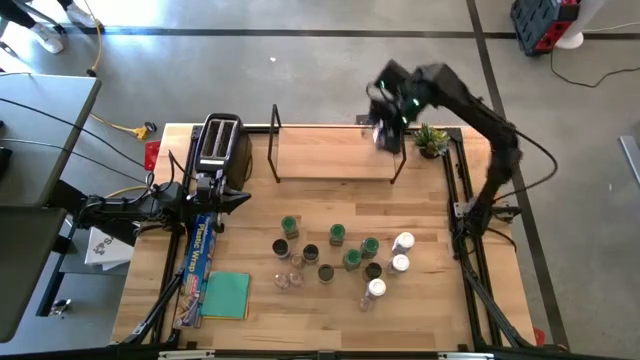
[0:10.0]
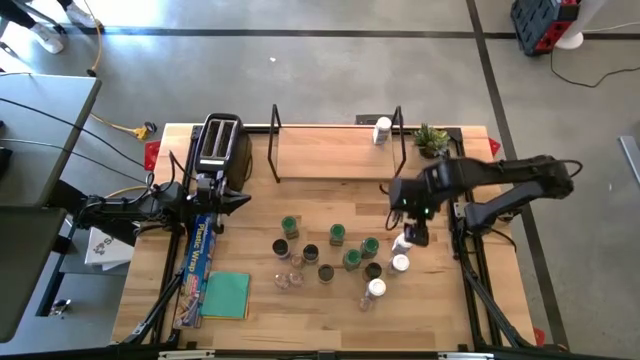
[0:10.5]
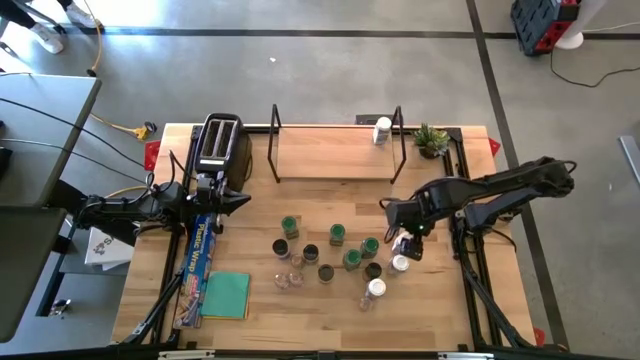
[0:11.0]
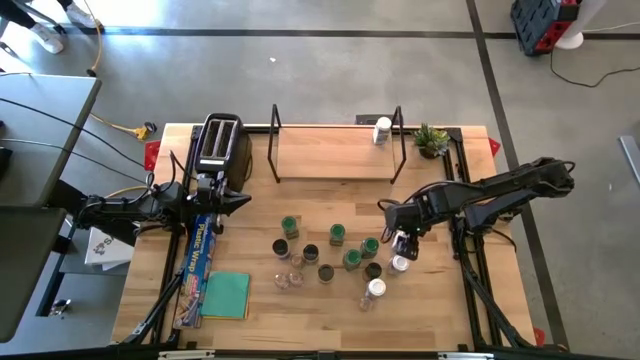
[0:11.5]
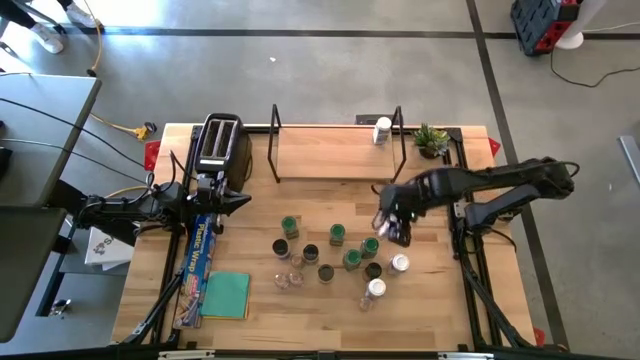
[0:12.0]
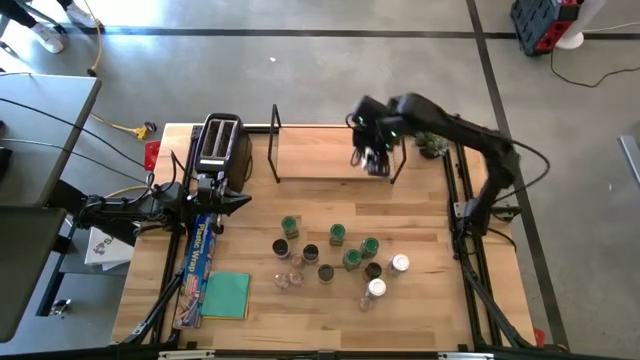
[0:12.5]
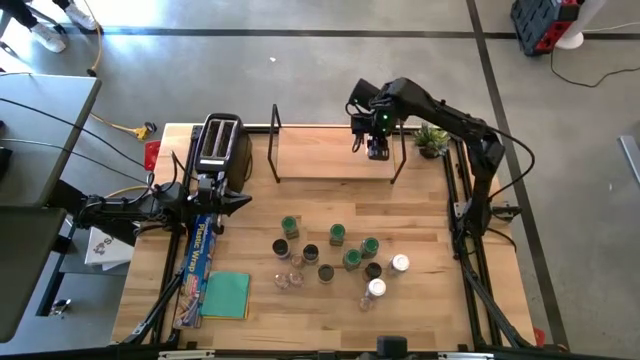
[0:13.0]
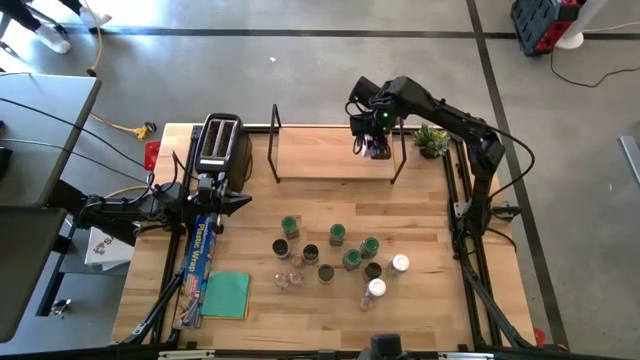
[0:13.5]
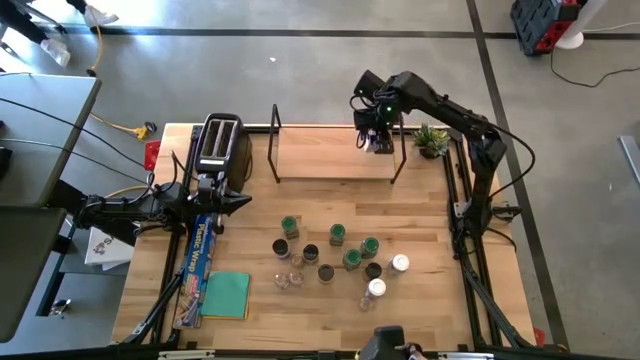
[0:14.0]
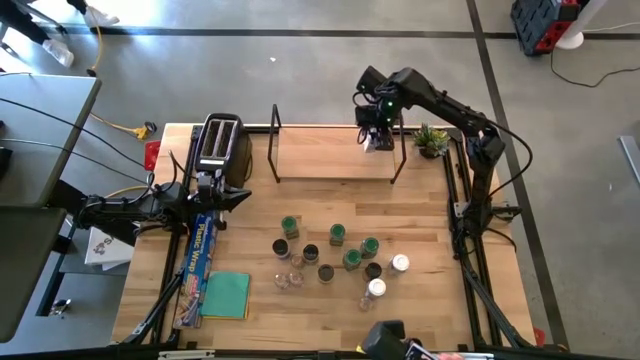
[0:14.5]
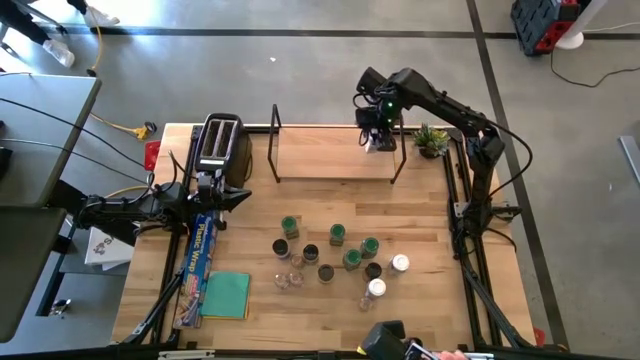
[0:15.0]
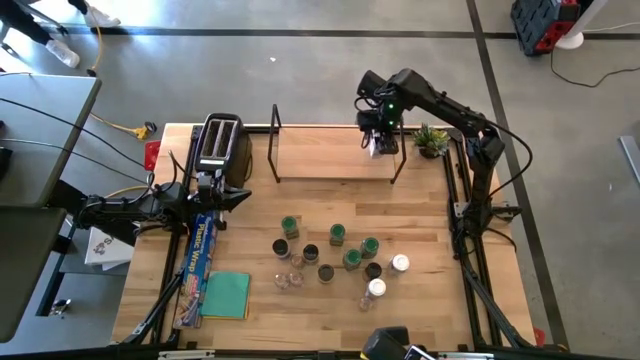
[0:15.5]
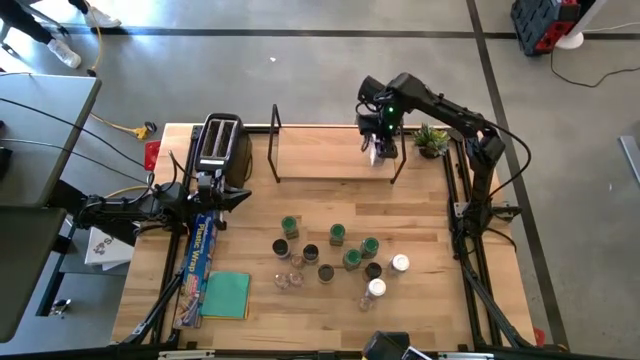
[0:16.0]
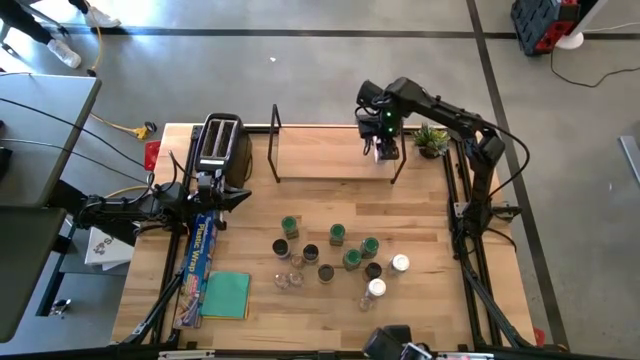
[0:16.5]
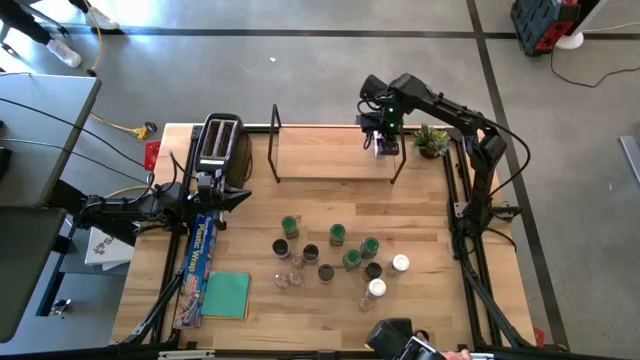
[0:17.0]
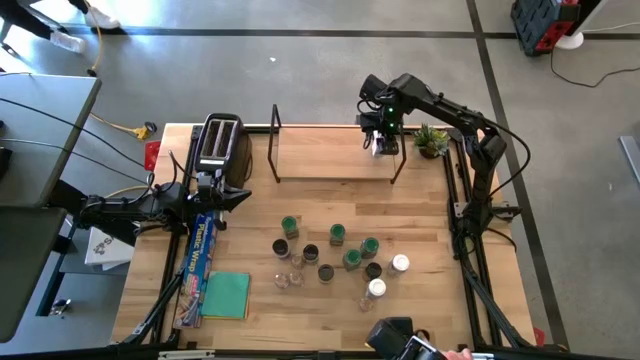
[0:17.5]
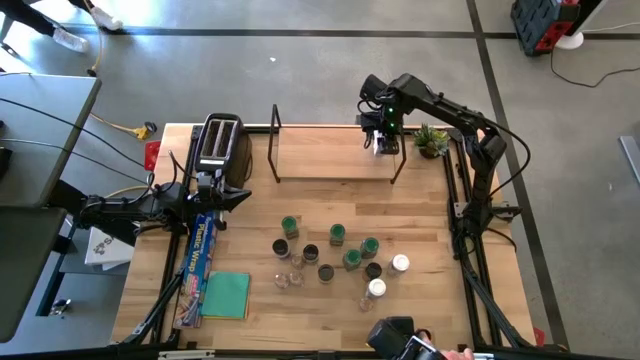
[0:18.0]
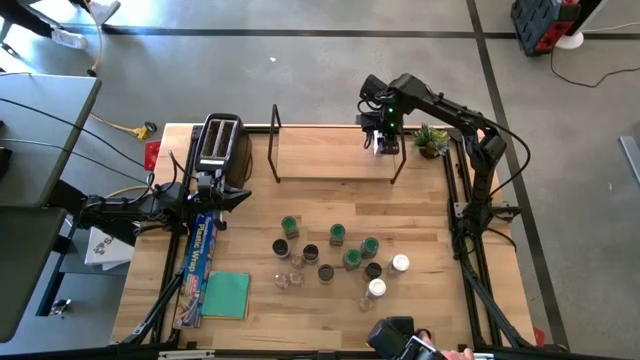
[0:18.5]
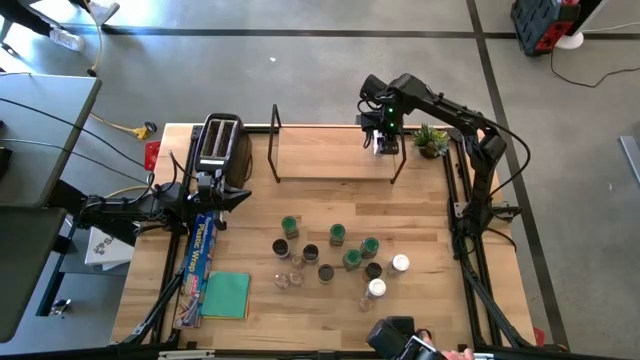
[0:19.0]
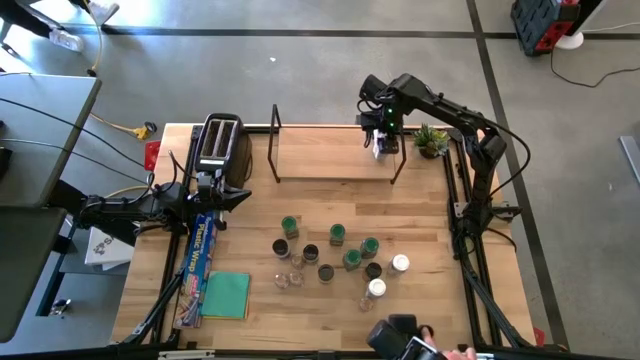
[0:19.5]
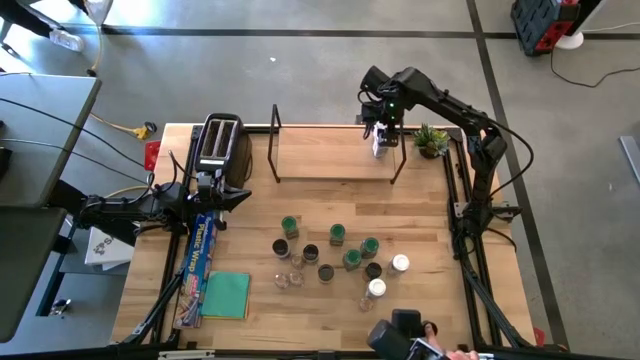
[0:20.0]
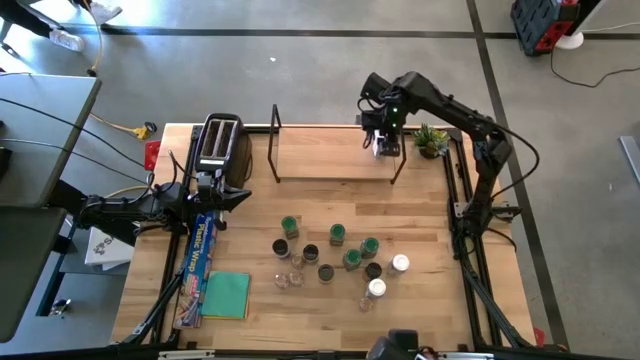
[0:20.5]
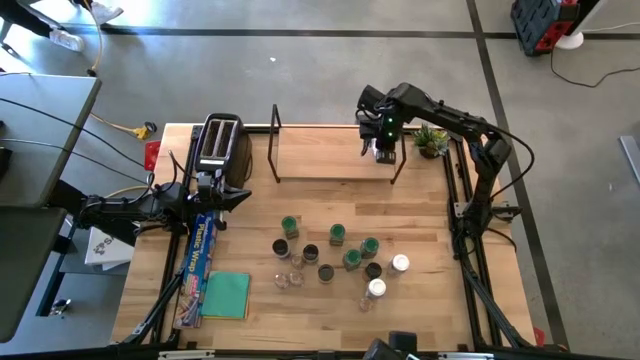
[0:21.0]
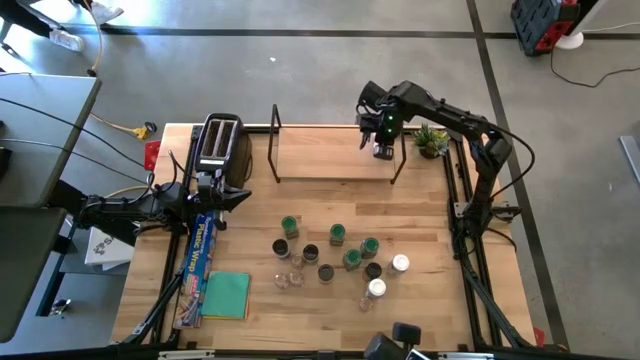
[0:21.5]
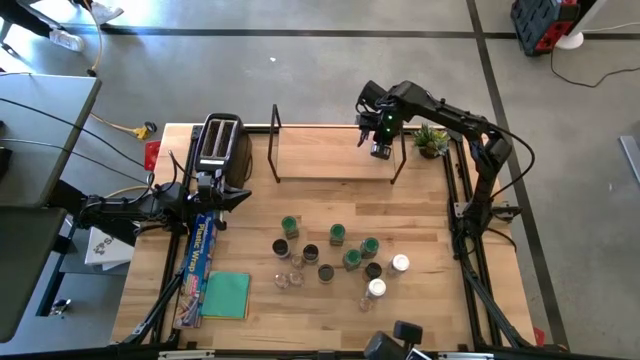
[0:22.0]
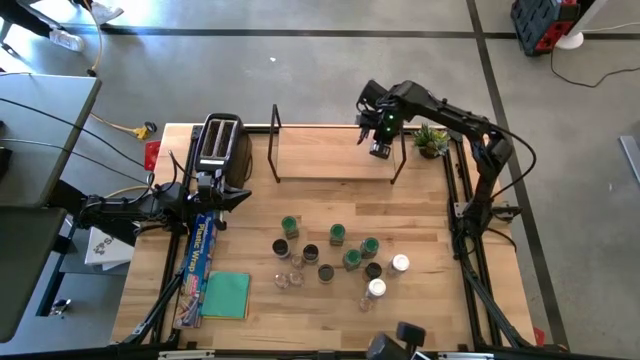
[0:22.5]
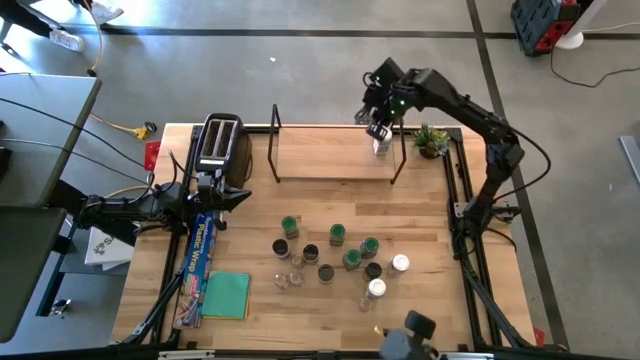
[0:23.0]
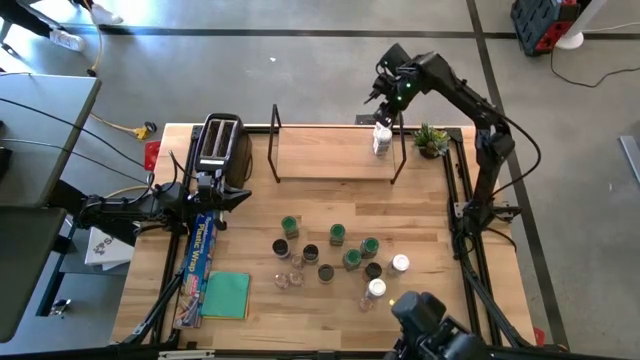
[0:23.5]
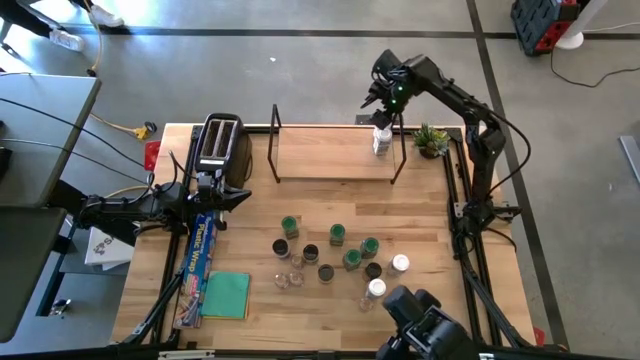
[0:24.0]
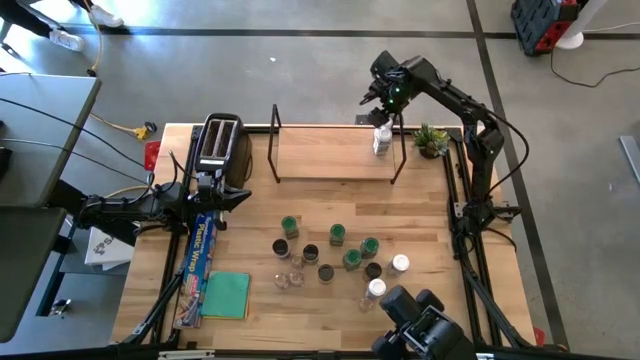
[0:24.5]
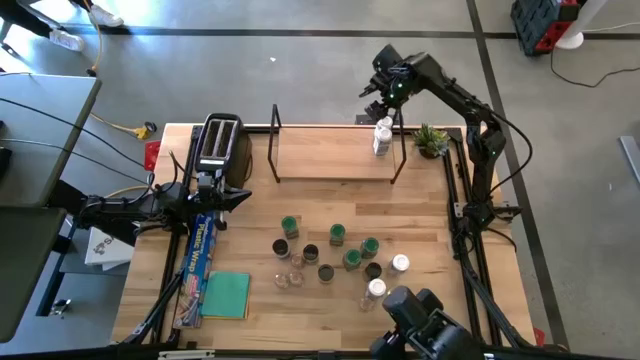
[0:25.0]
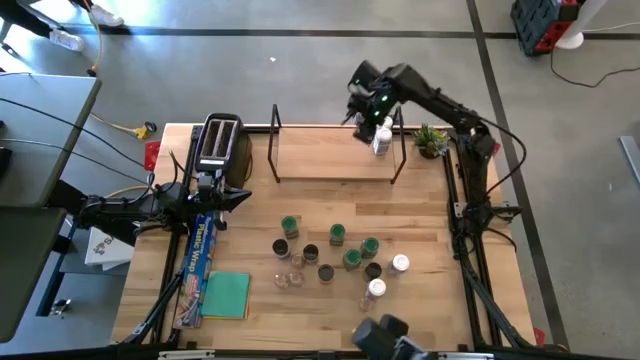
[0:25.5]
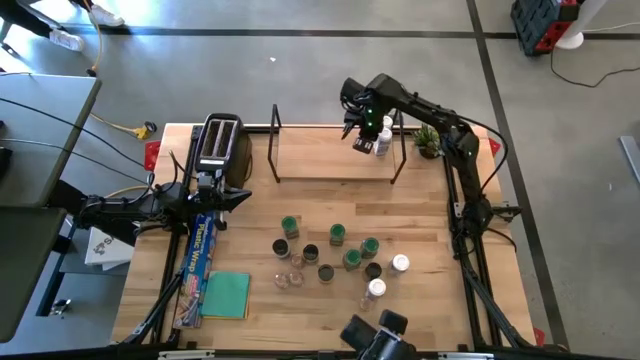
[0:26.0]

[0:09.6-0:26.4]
Task: Shelf spices
Put the white seasoning bottle on the shelf and align it with the other white seasoning bottle

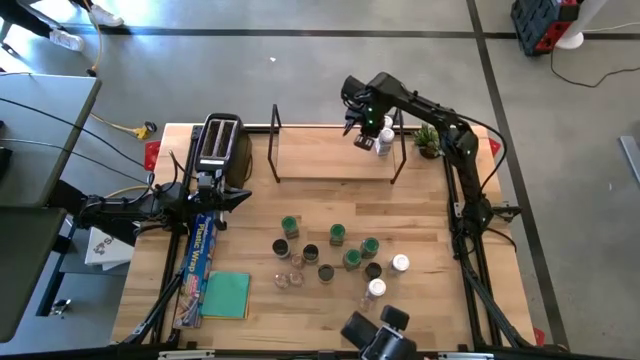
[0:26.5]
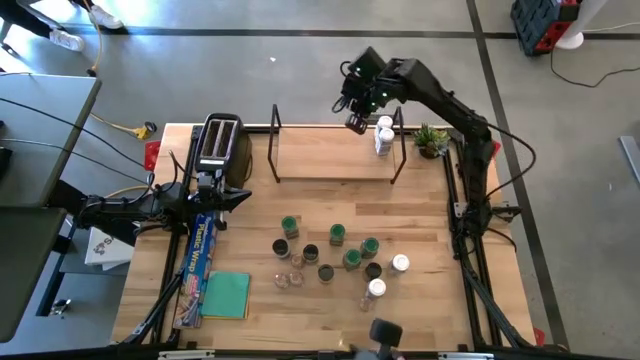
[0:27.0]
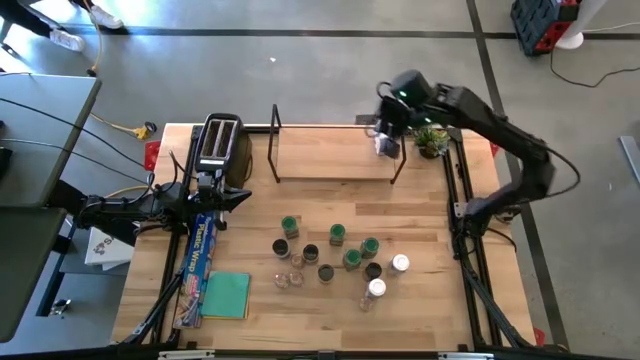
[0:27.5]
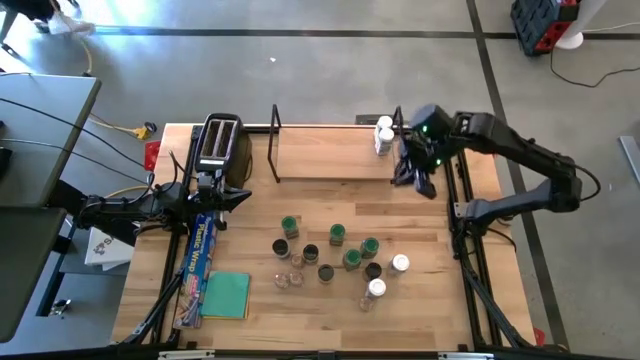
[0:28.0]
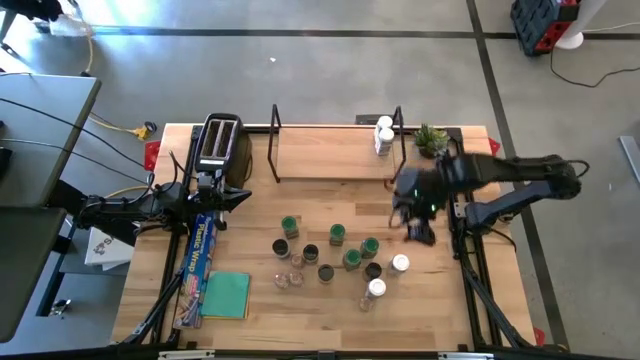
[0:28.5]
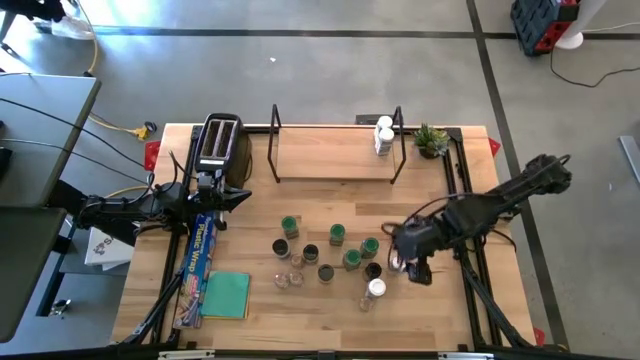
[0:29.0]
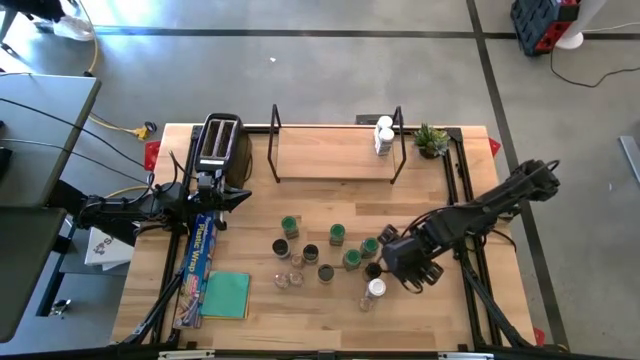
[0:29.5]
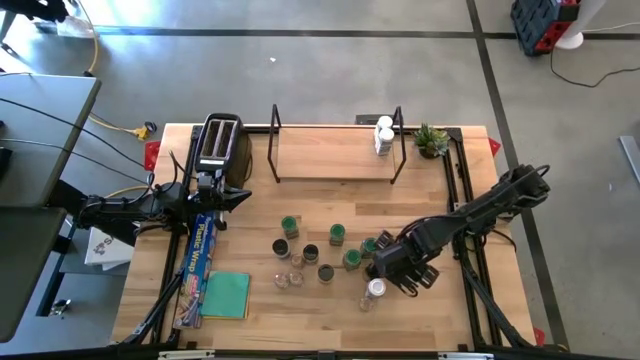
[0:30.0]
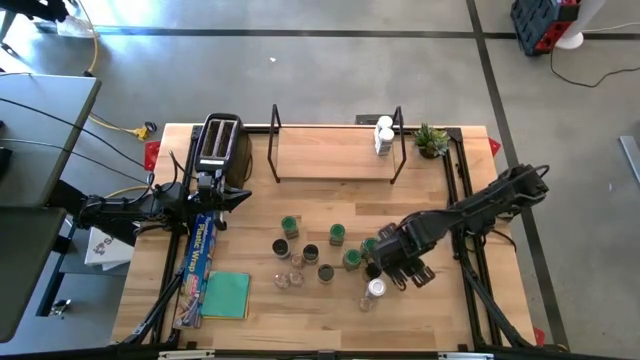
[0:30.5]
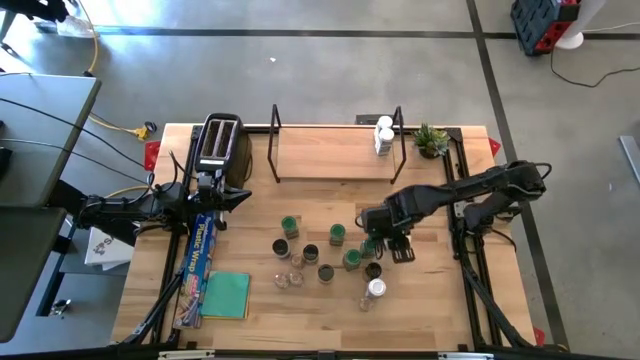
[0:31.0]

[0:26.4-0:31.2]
Put the white seasoning bottle on the shelf and align it with the other white seasoning bottles
